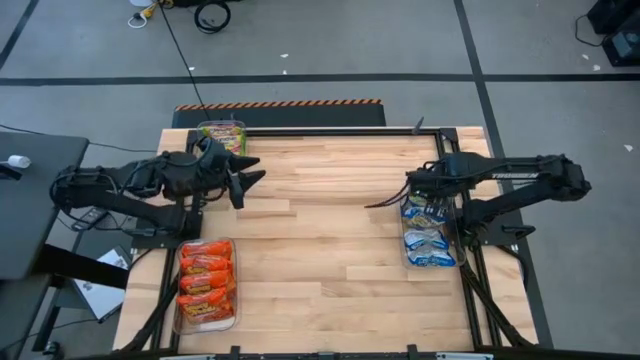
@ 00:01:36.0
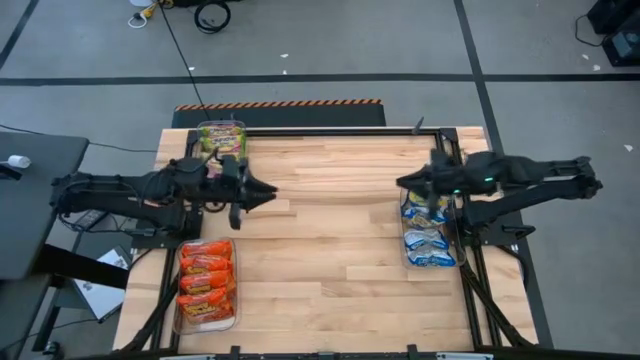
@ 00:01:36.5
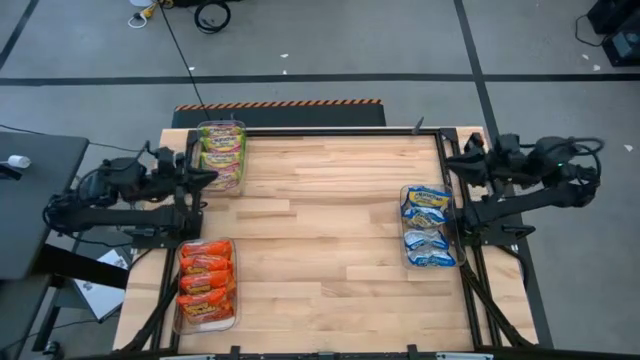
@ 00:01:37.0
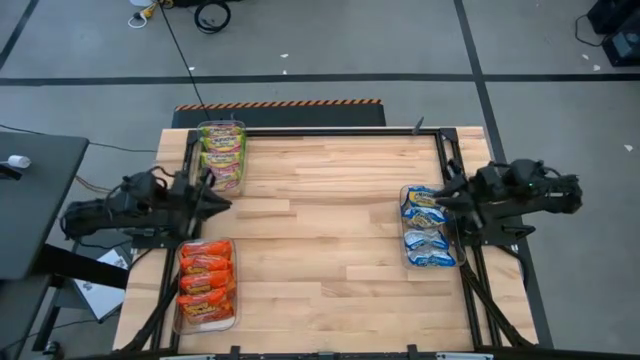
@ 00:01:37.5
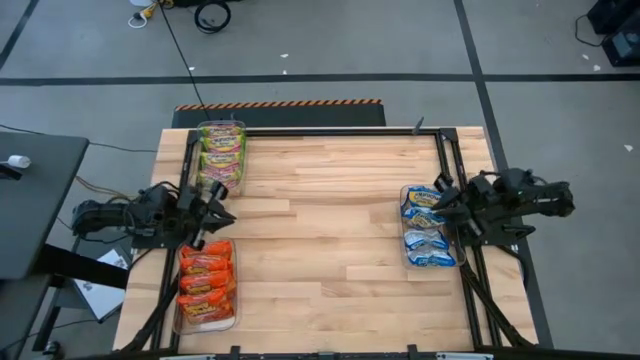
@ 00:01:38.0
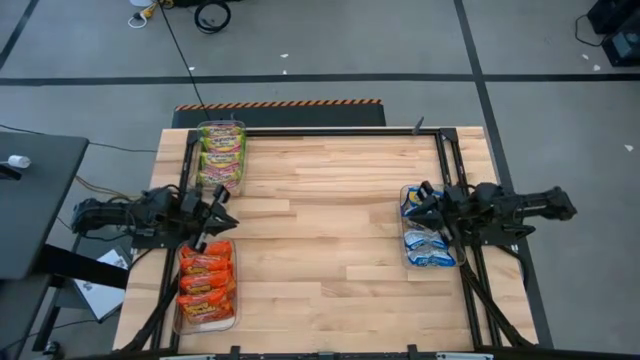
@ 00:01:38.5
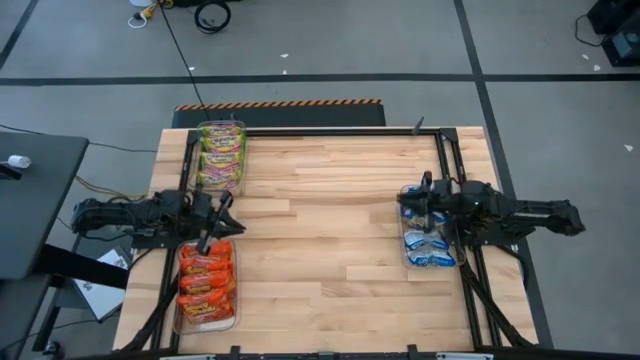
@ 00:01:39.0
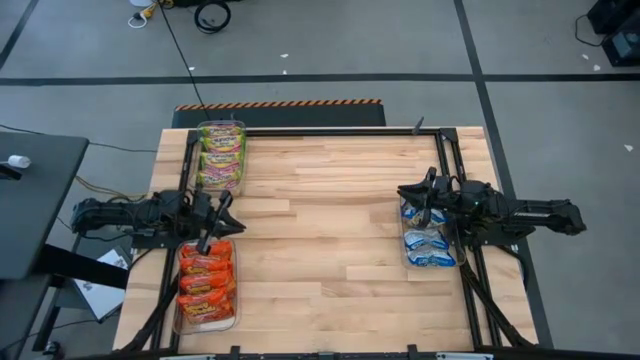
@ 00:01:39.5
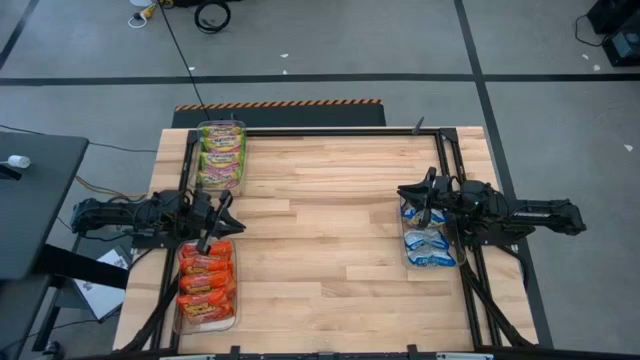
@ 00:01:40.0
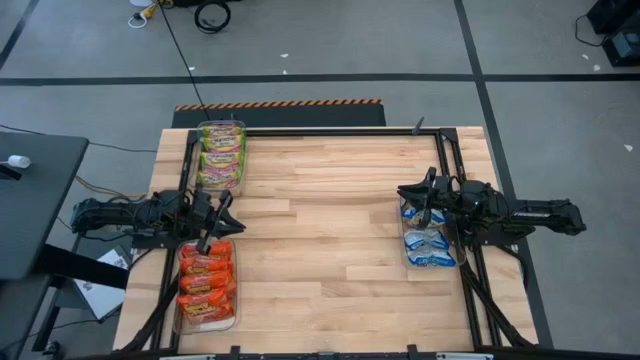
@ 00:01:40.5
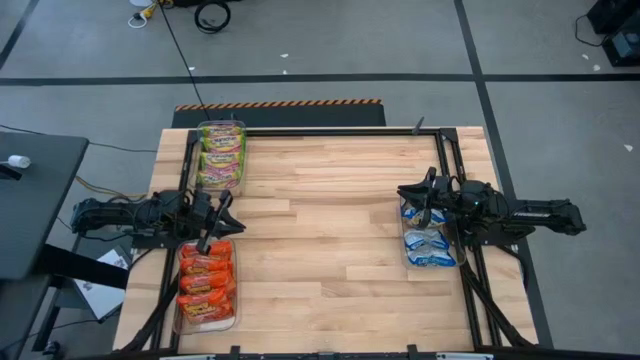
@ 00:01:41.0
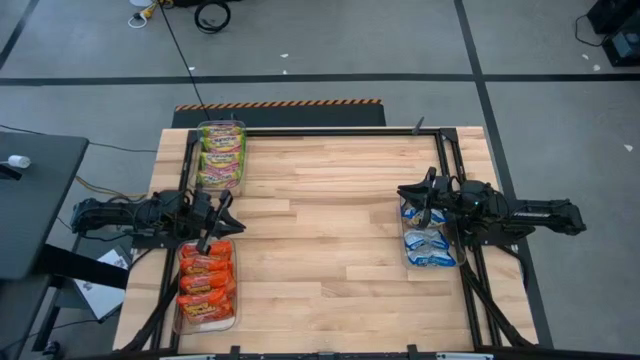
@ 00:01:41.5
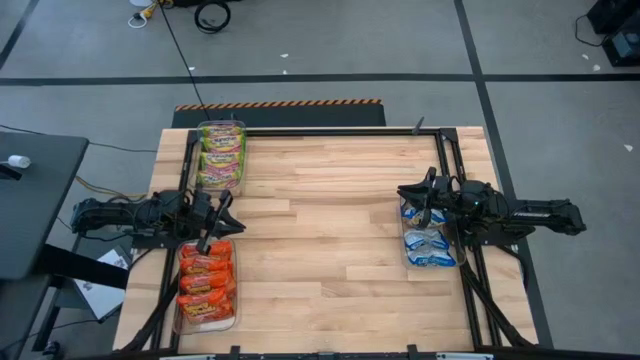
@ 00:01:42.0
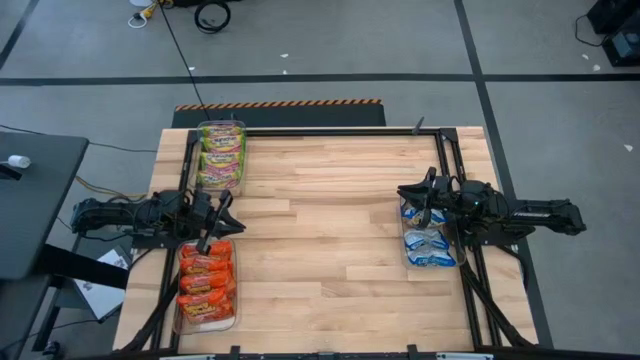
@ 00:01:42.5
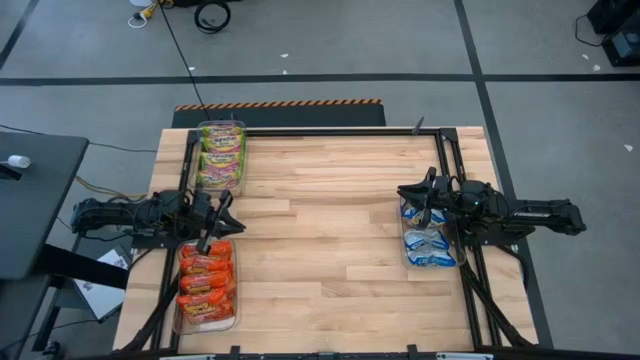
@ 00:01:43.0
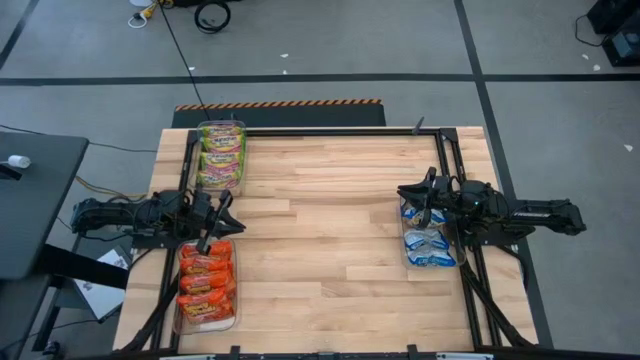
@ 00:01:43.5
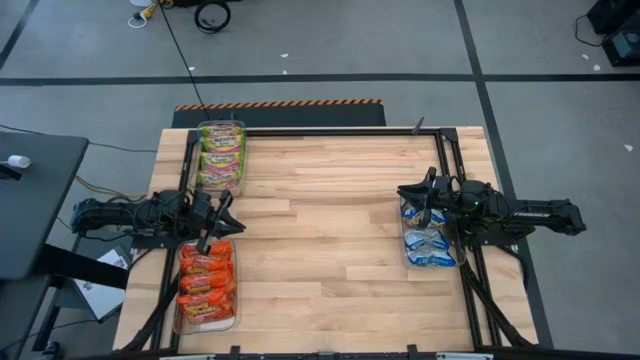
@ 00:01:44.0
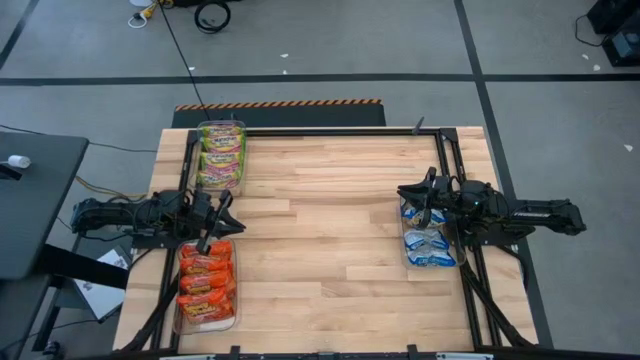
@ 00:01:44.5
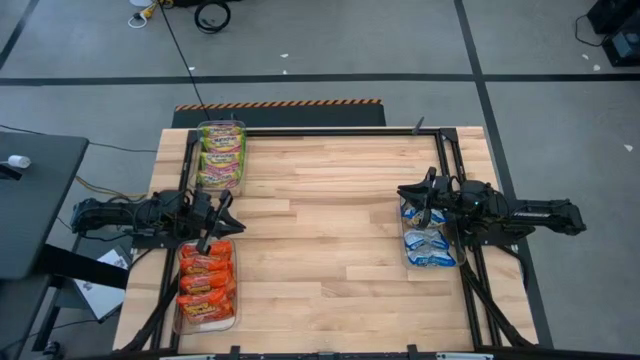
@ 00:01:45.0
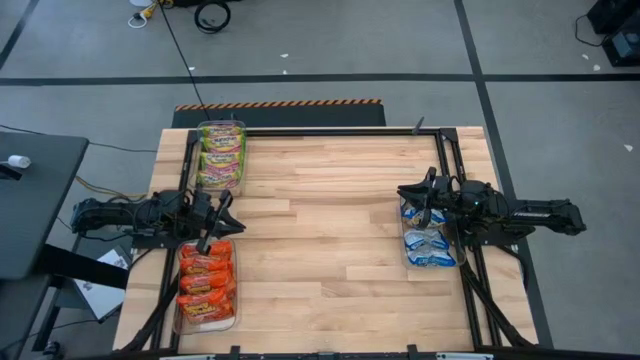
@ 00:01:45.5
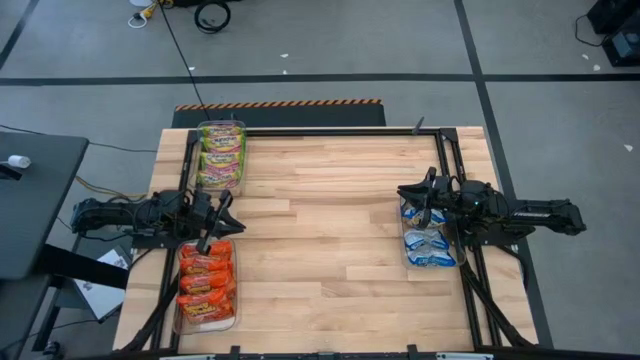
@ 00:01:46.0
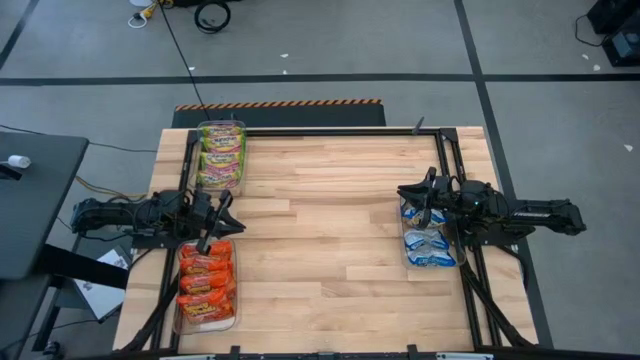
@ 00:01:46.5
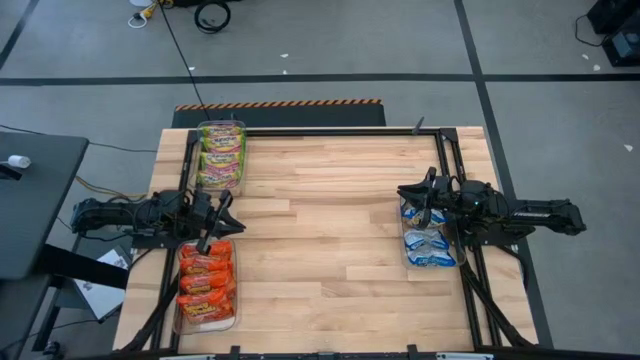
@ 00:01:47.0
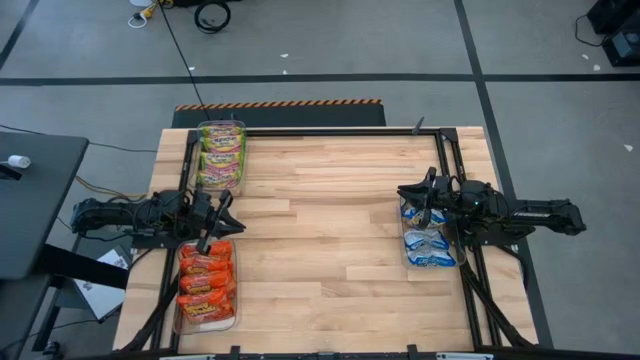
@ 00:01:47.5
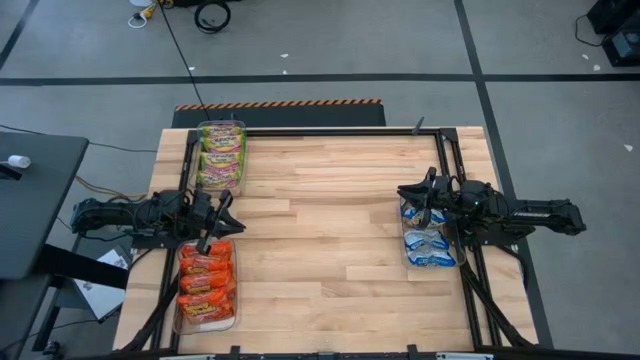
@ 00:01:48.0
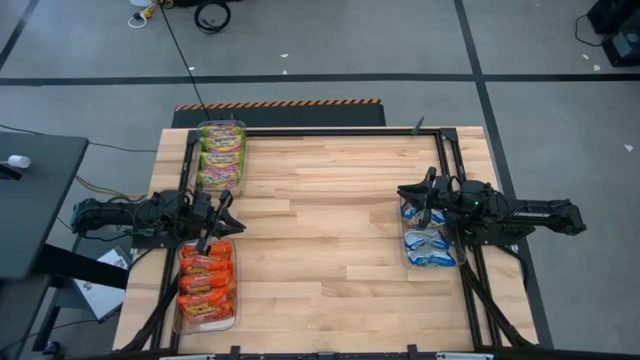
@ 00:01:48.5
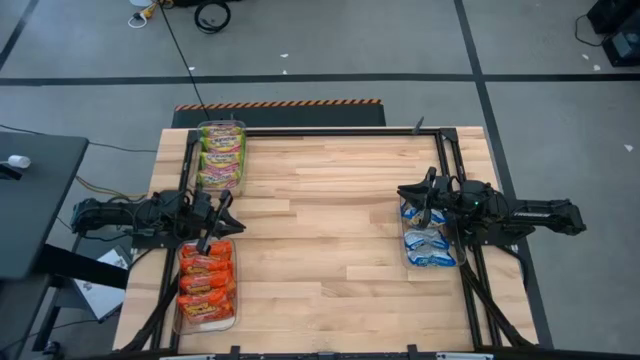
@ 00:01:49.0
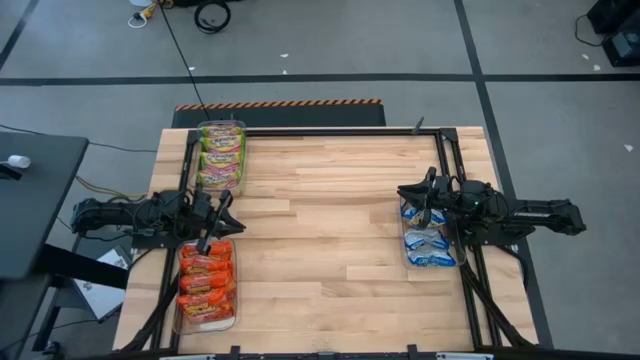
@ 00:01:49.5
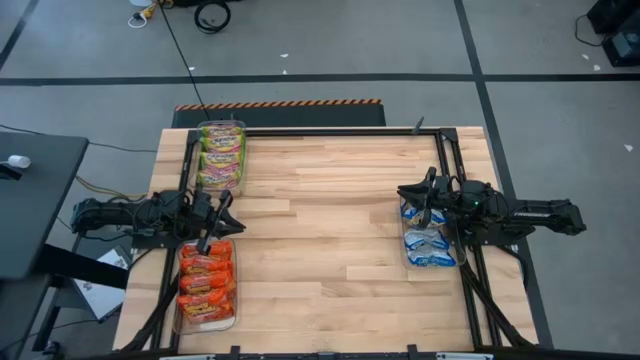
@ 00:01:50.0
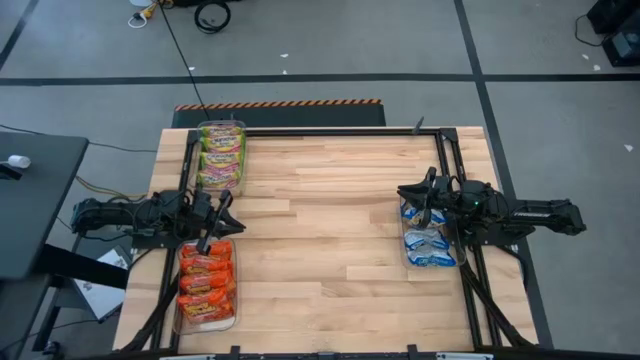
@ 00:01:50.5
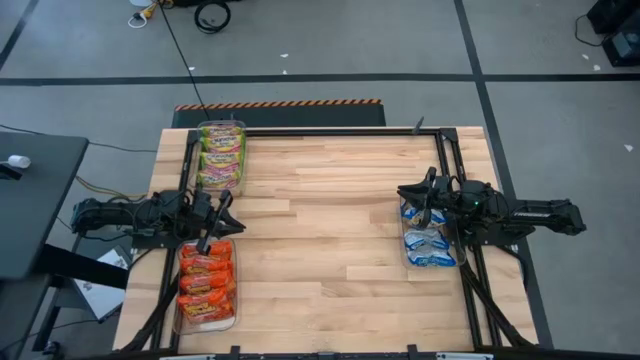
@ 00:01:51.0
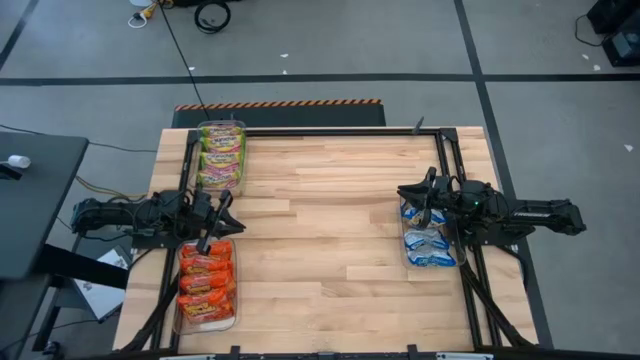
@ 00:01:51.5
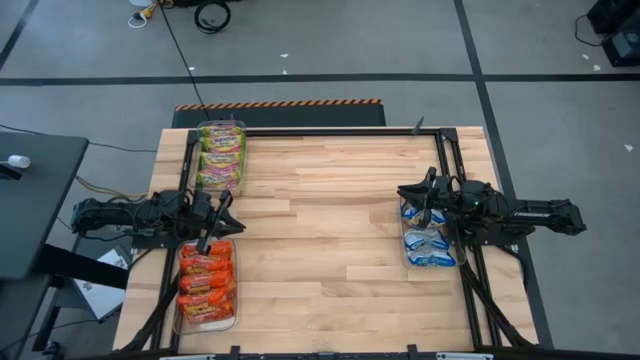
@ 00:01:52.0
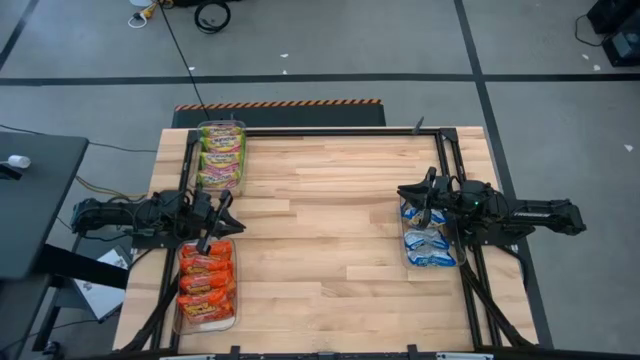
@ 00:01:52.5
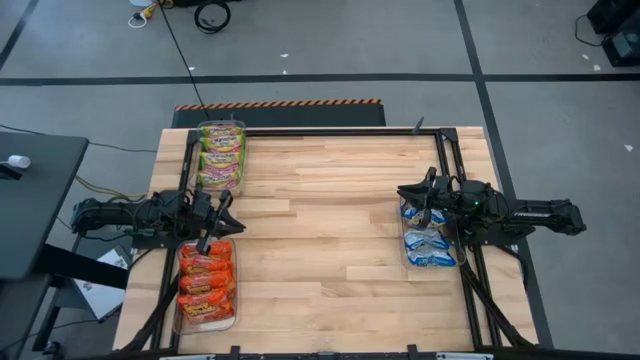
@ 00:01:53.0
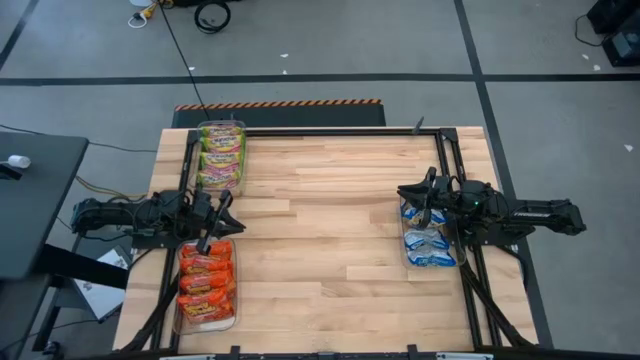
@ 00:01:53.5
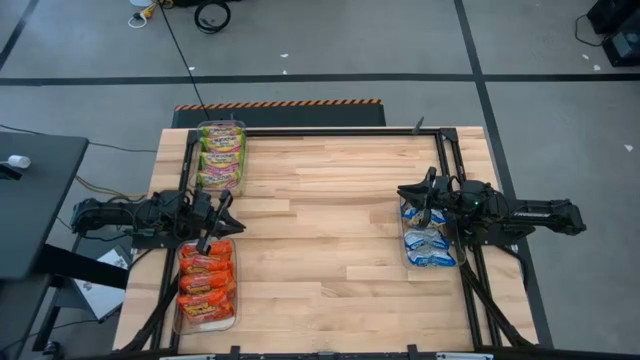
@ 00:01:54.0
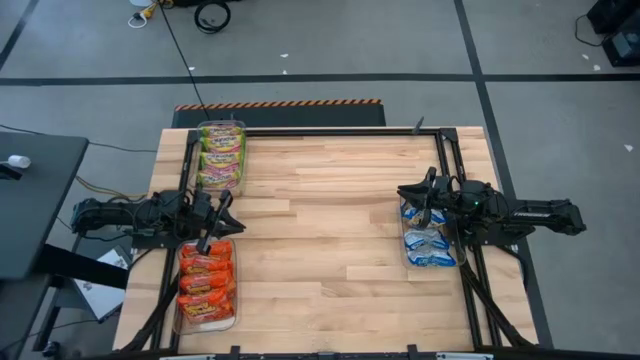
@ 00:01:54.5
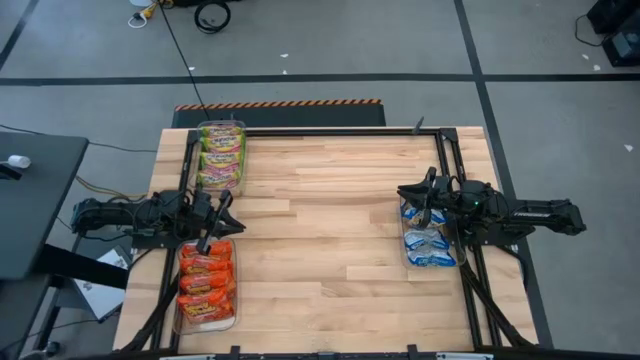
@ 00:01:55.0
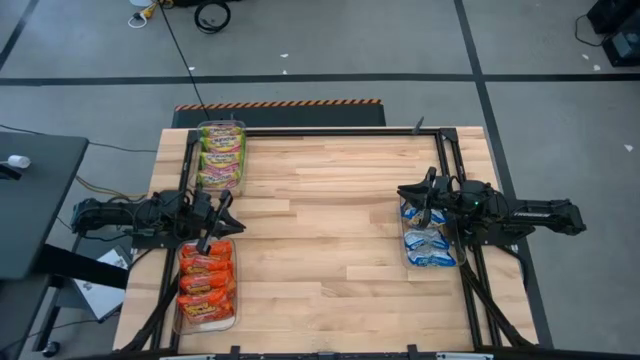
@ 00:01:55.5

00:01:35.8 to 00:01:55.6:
Task: Sort Maruchan noodles
Return to Home Position
